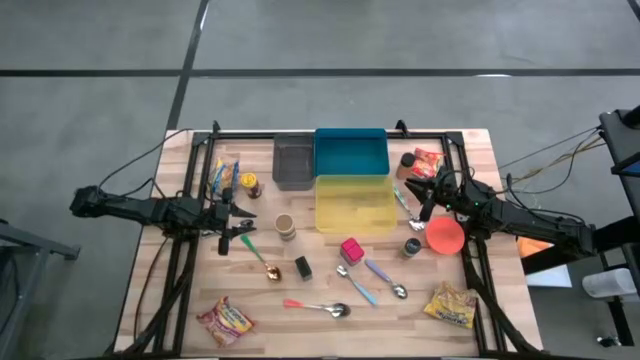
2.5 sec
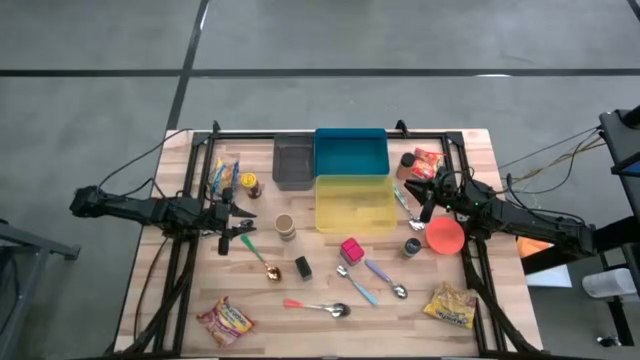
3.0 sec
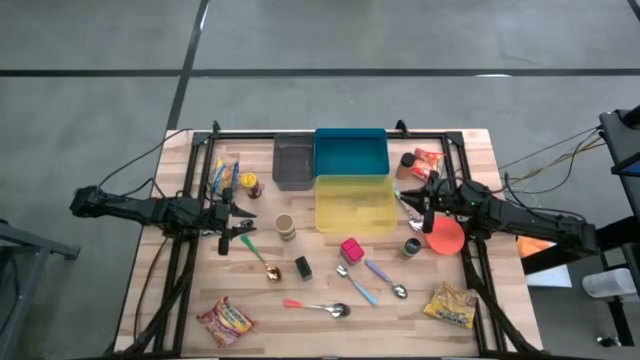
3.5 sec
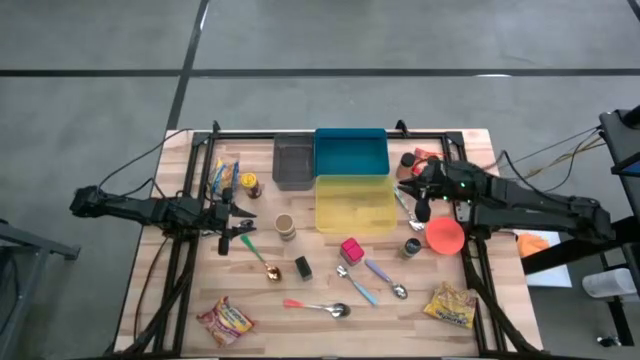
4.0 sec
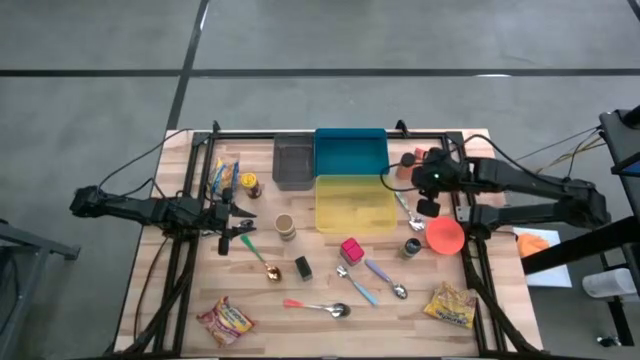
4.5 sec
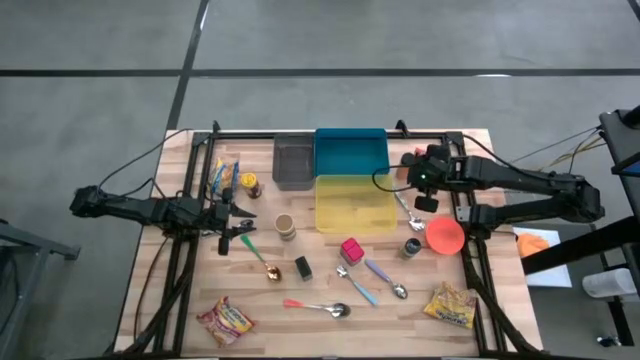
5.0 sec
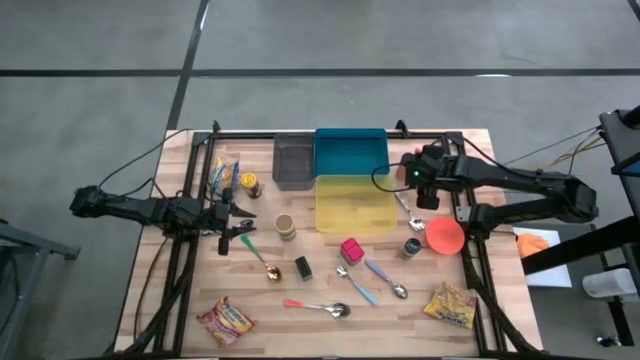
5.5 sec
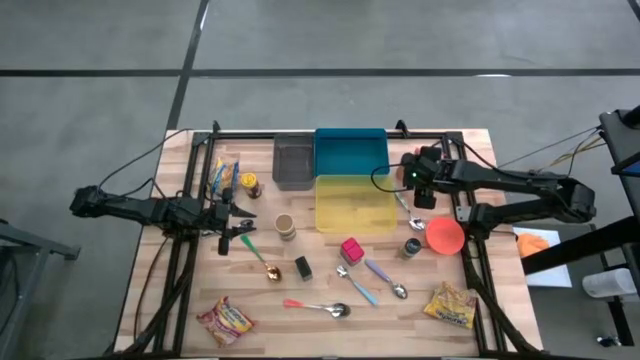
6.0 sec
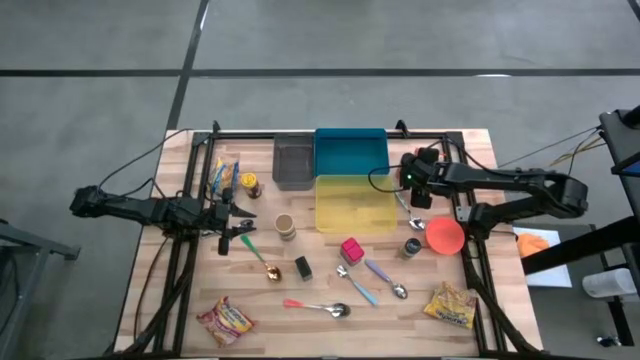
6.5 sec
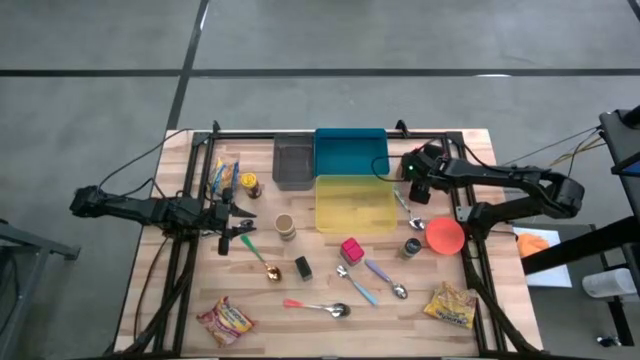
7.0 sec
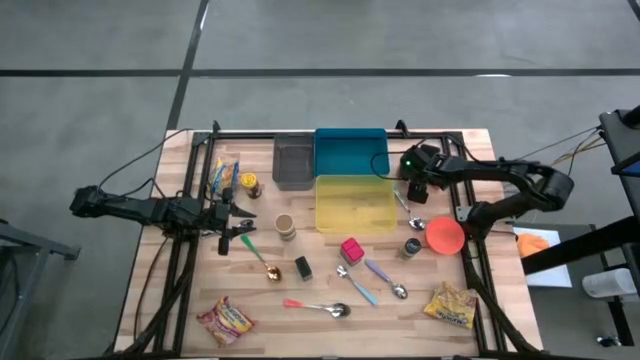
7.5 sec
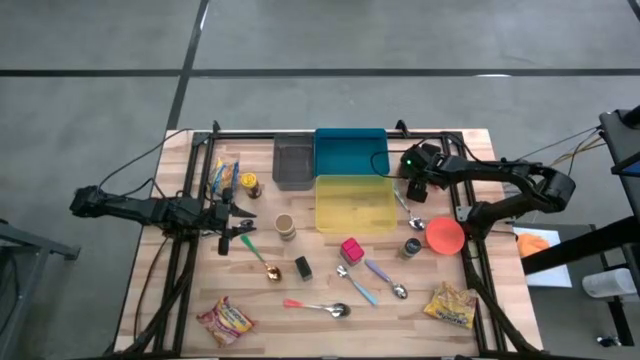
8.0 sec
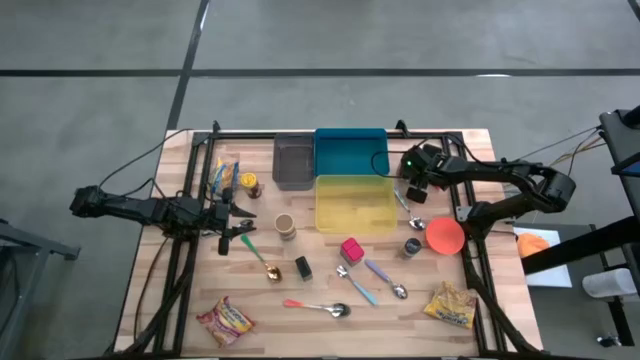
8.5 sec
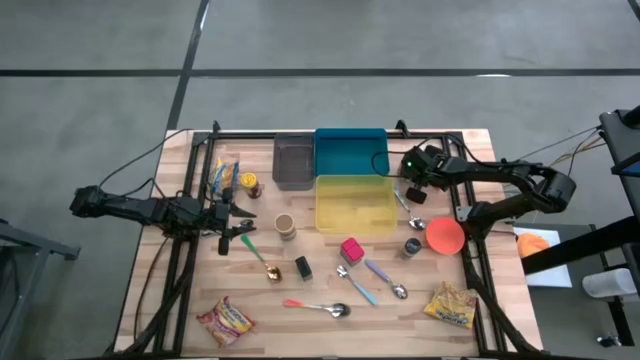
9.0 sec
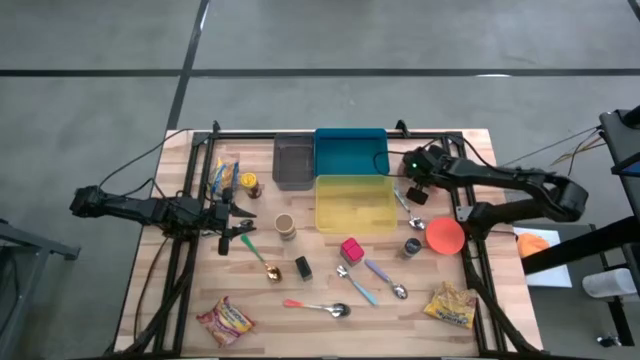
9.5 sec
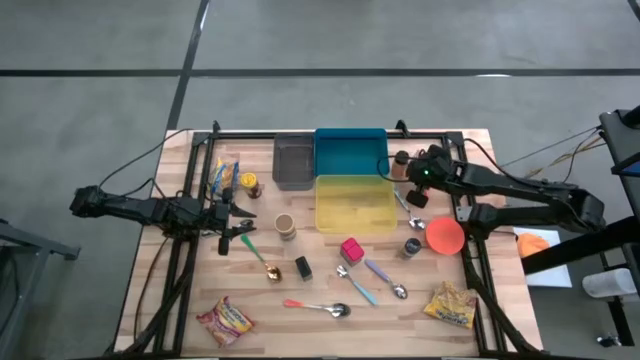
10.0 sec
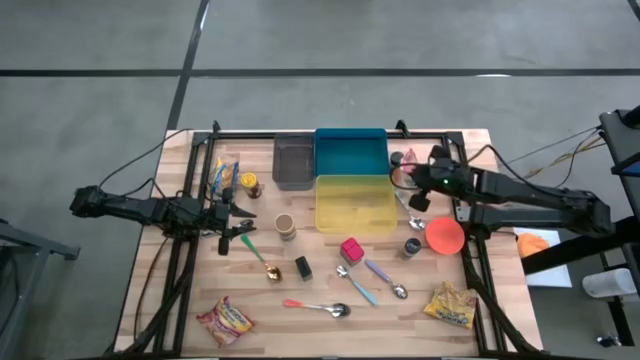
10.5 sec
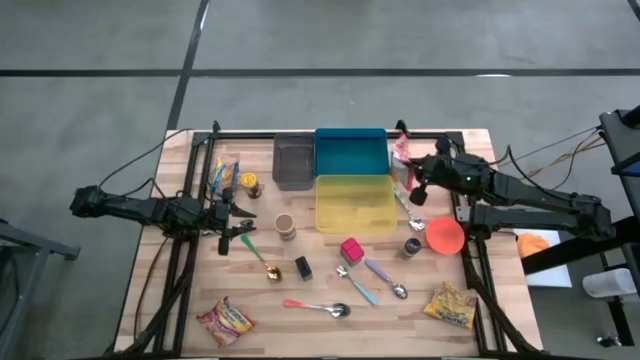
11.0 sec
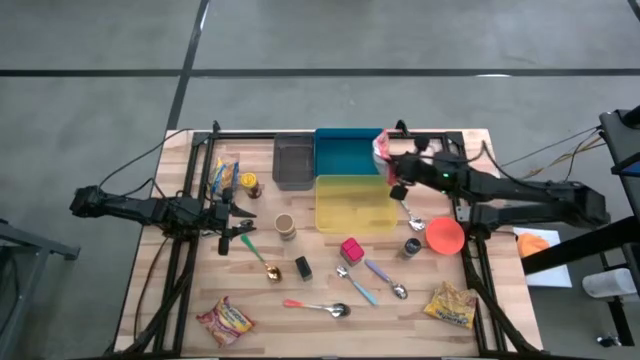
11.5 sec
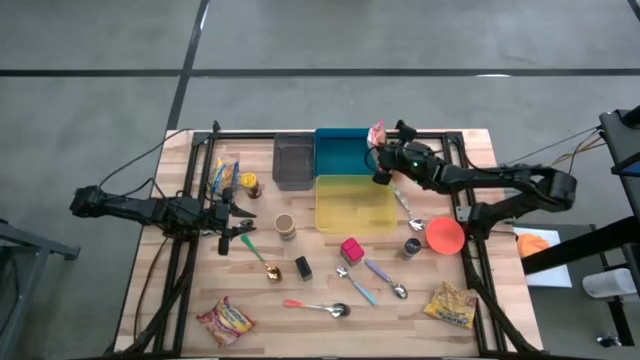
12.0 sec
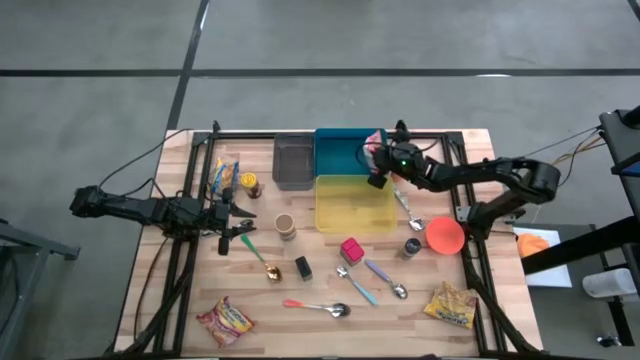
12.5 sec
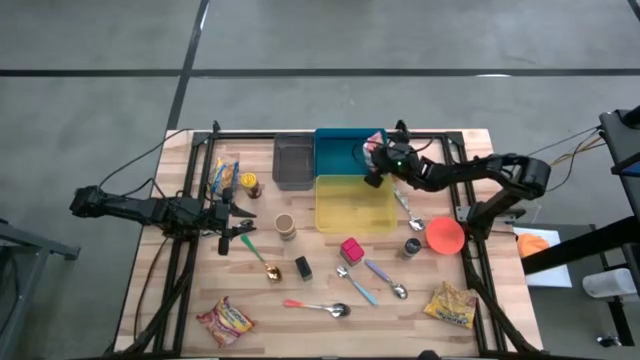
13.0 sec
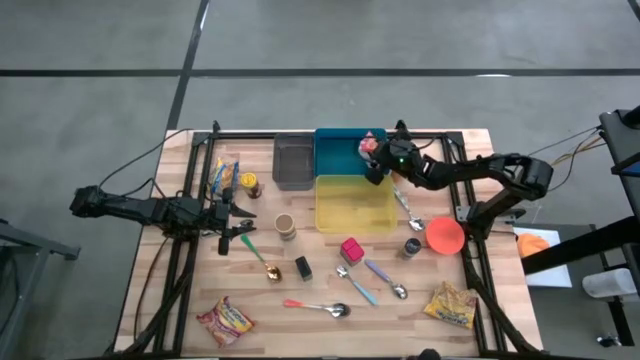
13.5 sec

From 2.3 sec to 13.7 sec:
Put the orange noodle pack into the blue bin

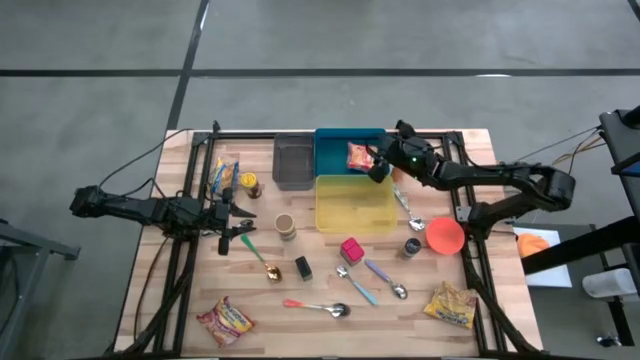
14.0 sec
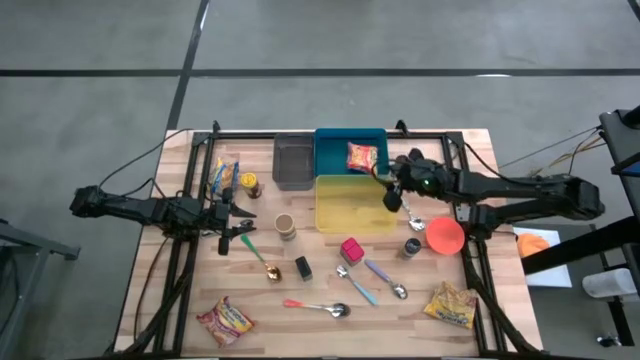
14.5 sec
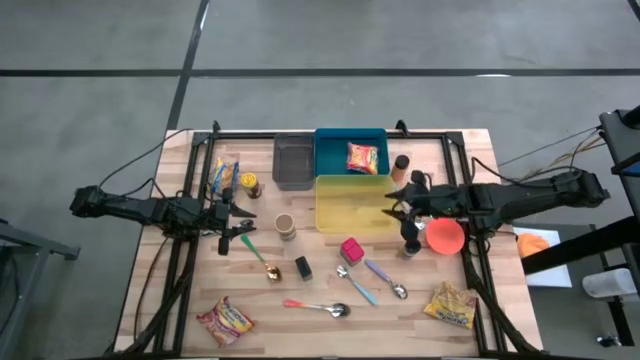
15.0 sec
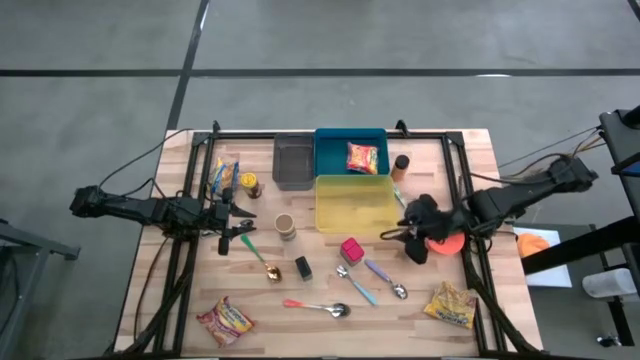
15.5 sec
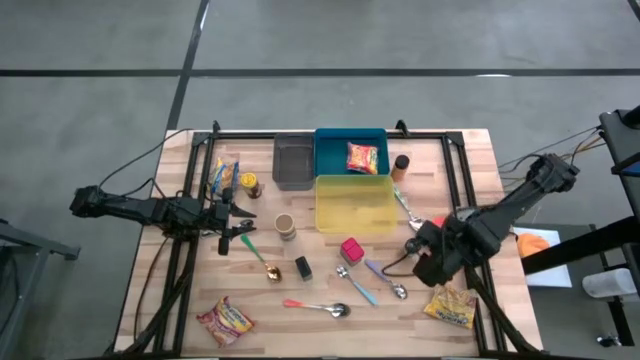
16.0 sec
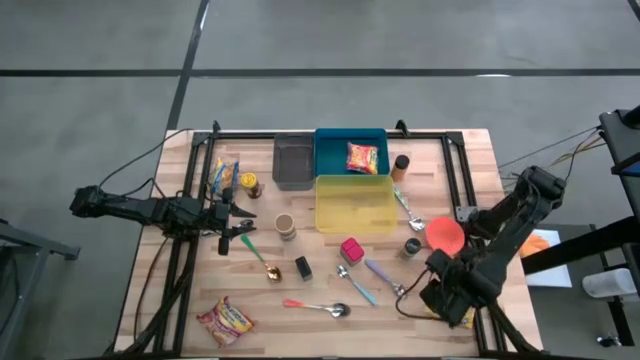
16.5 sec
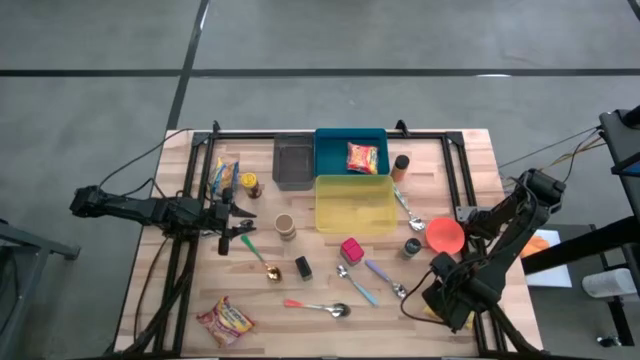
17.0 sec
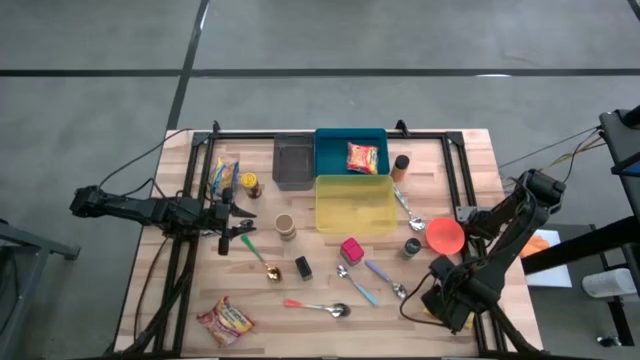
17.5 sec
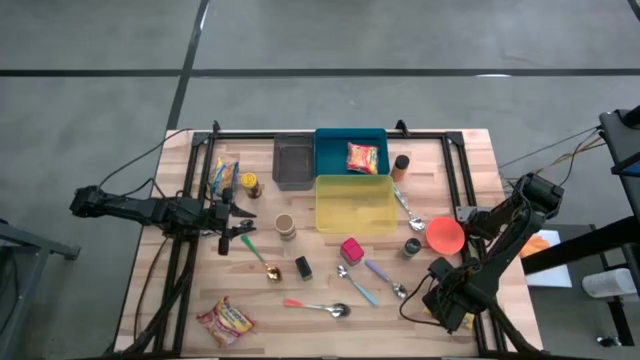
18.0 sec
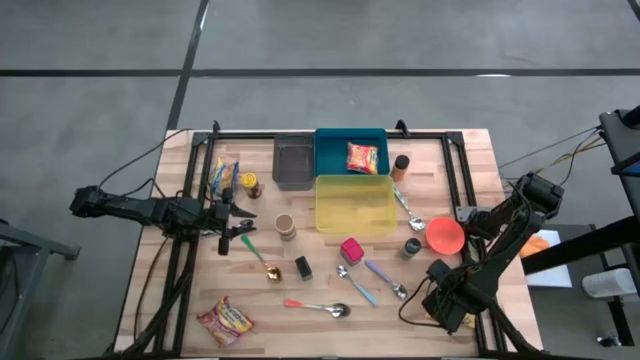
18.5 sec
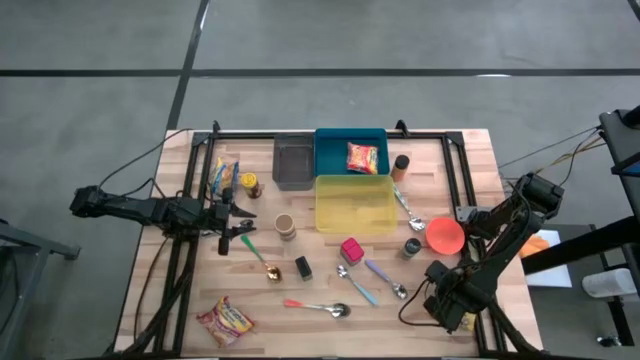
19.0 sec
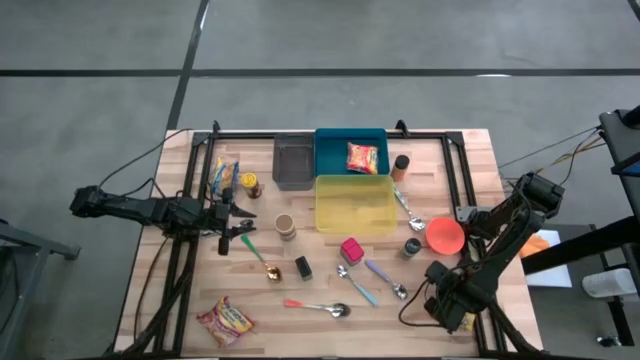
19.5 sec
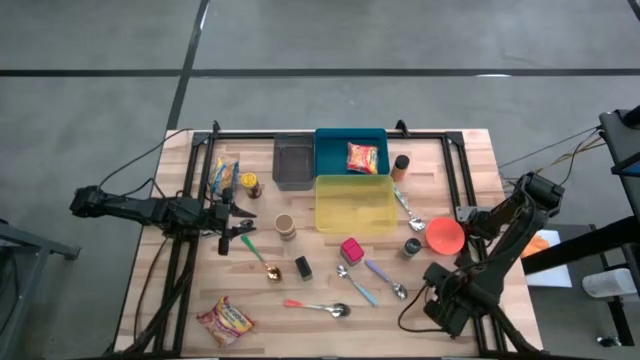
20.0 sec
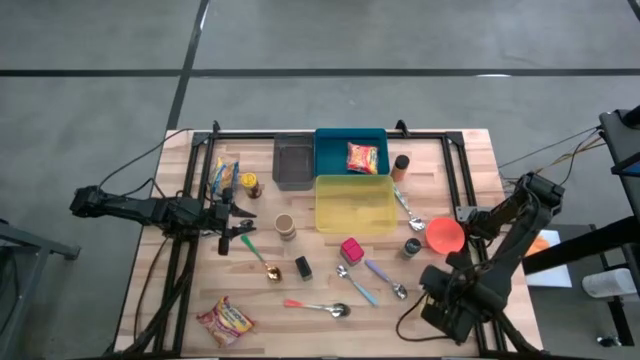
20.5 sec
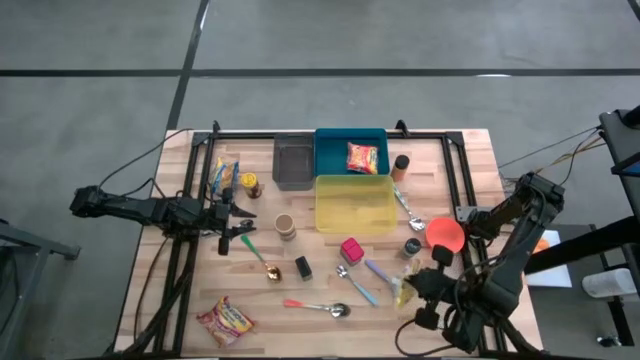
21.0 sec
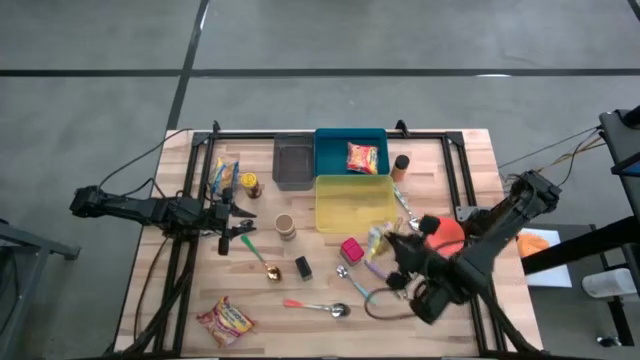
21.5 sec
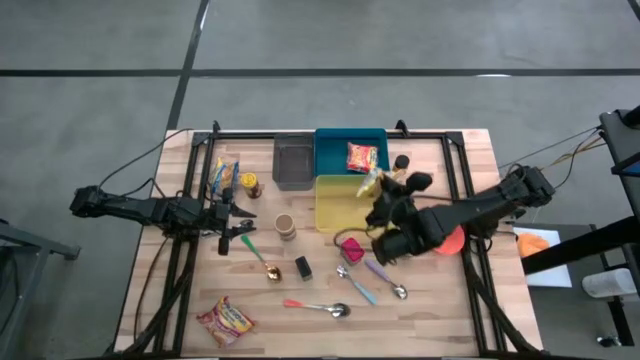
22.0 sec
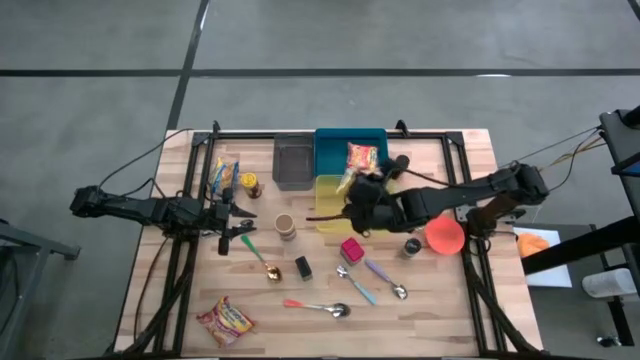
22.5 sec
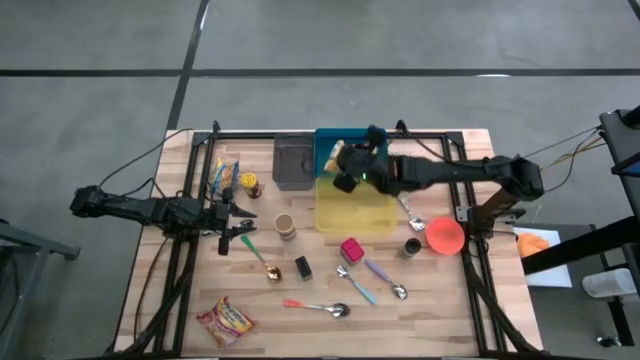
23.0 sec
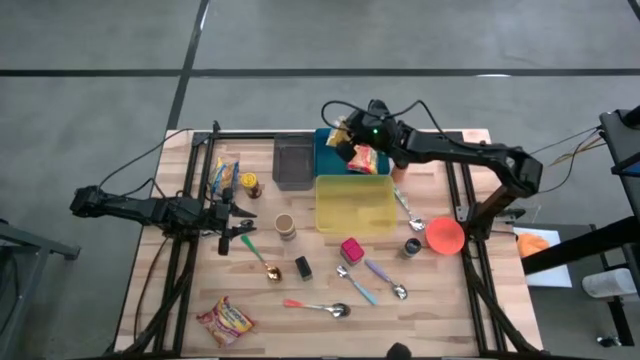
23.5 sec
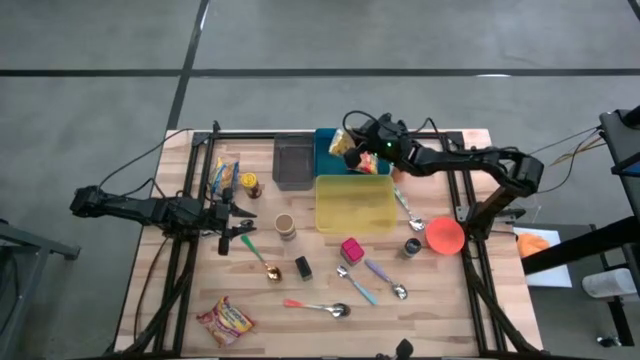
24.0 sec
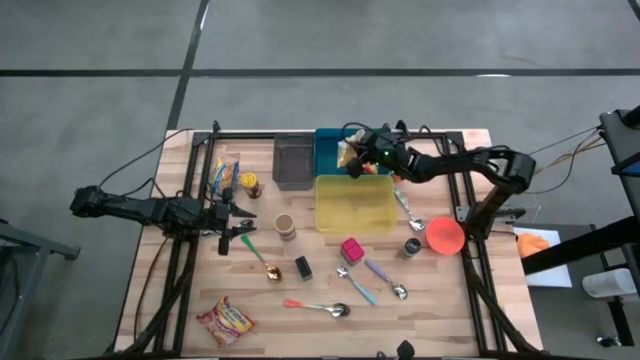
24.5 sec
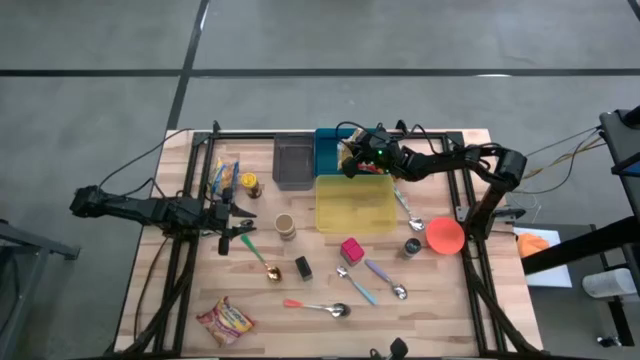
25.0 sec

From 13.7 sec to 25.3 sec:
Put the yellow noodle pack into the blue bin
